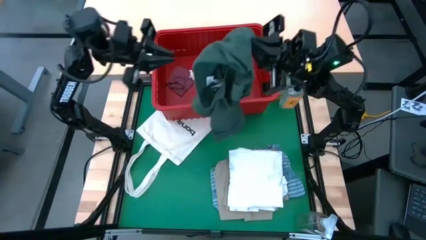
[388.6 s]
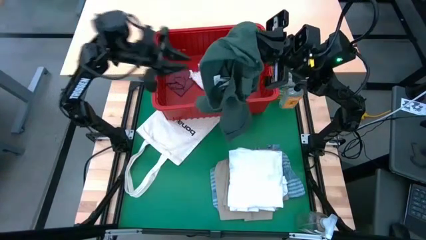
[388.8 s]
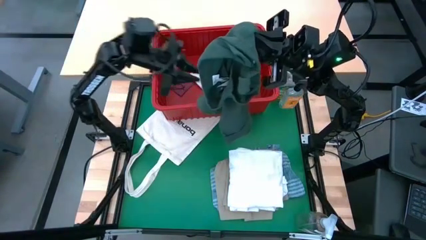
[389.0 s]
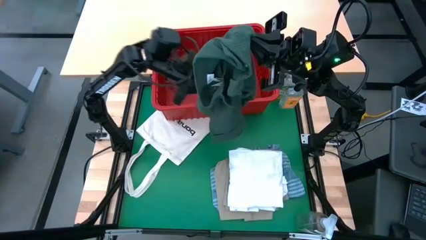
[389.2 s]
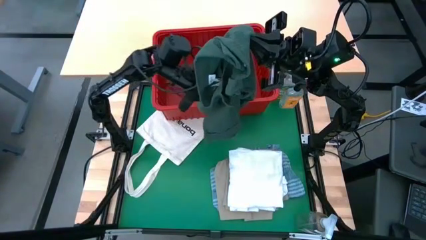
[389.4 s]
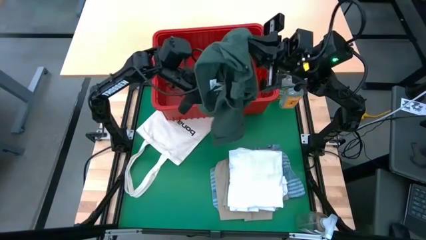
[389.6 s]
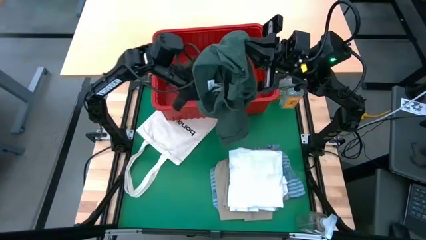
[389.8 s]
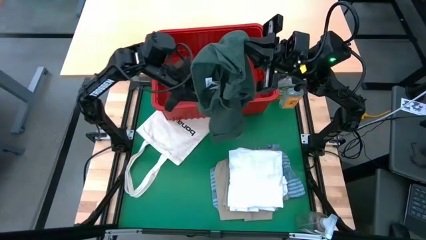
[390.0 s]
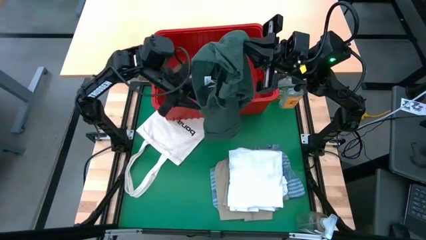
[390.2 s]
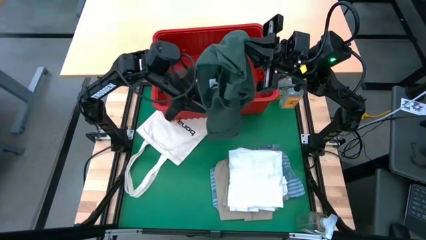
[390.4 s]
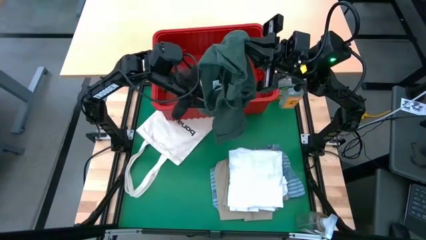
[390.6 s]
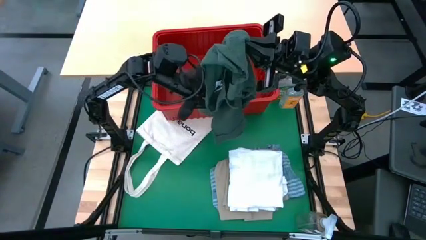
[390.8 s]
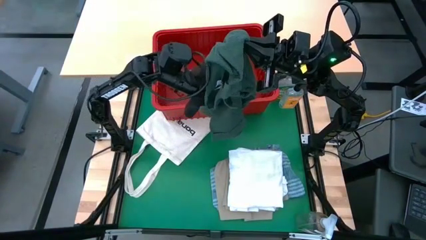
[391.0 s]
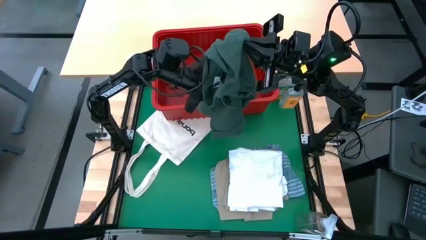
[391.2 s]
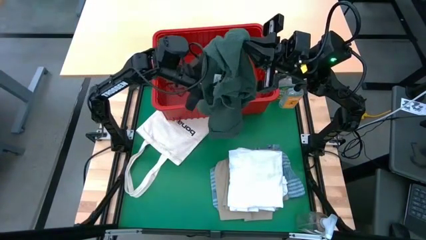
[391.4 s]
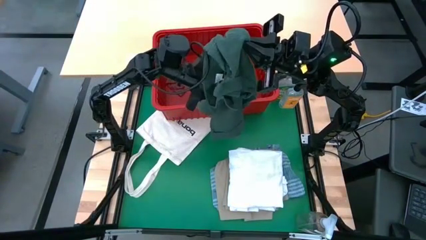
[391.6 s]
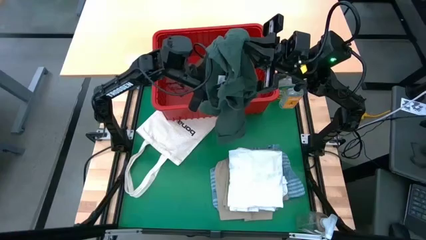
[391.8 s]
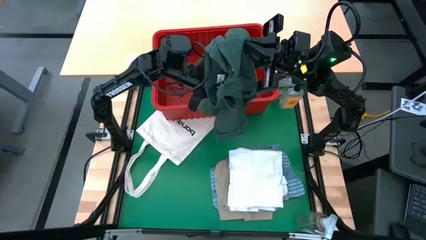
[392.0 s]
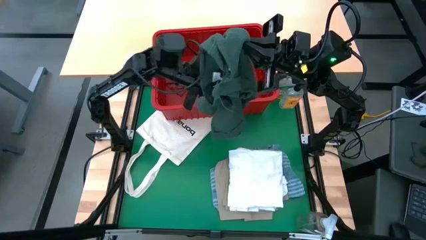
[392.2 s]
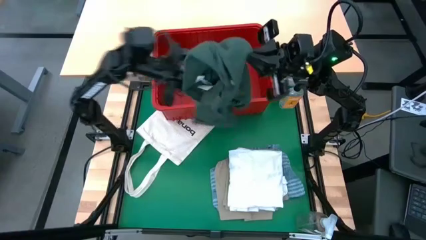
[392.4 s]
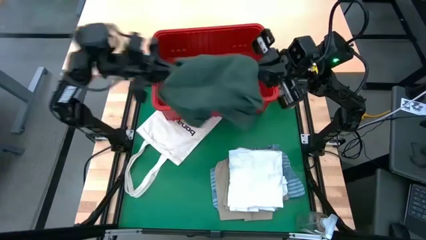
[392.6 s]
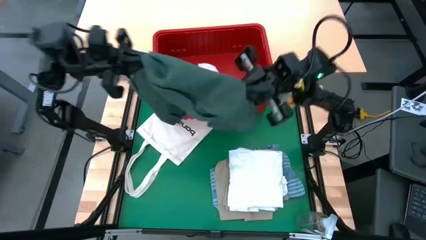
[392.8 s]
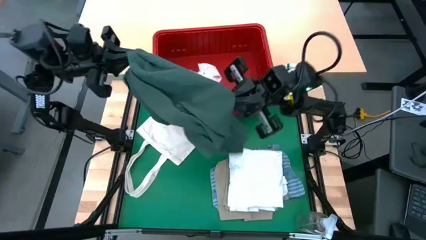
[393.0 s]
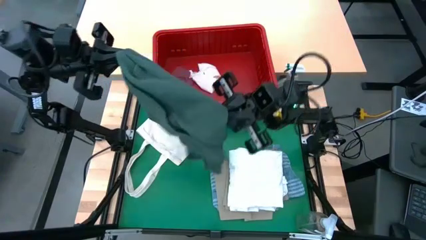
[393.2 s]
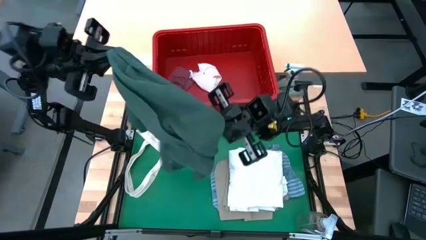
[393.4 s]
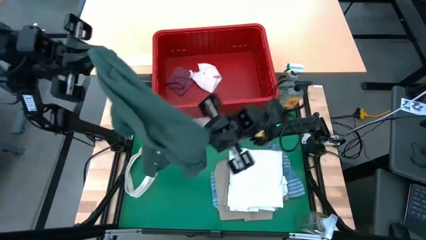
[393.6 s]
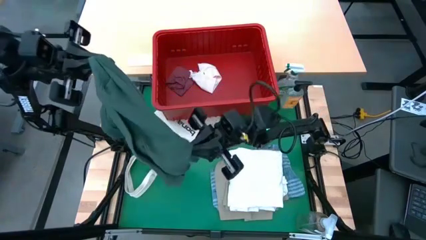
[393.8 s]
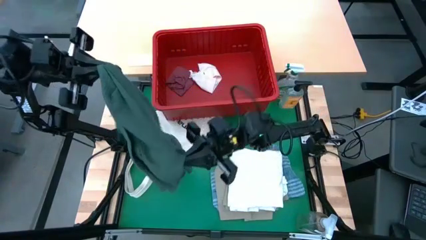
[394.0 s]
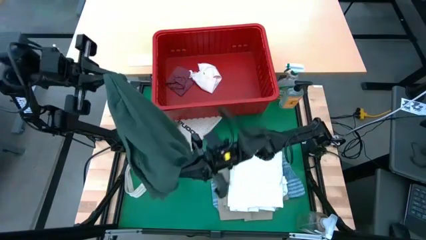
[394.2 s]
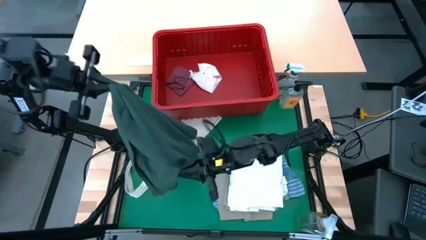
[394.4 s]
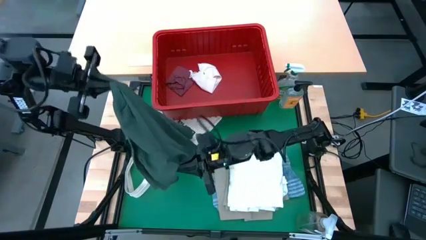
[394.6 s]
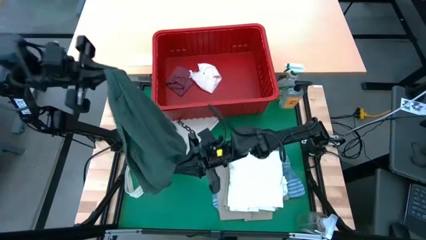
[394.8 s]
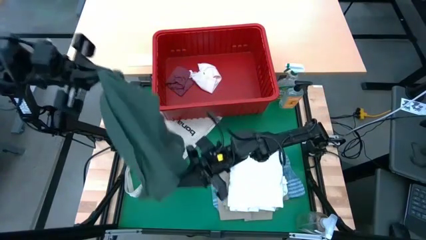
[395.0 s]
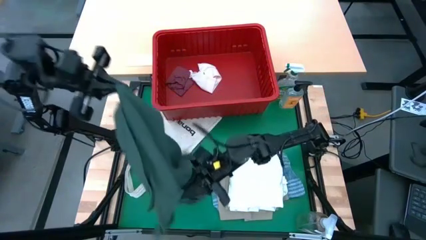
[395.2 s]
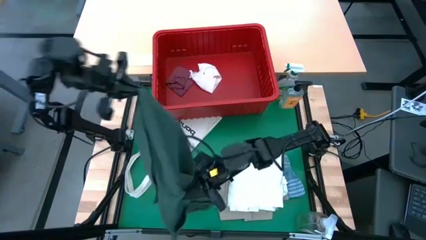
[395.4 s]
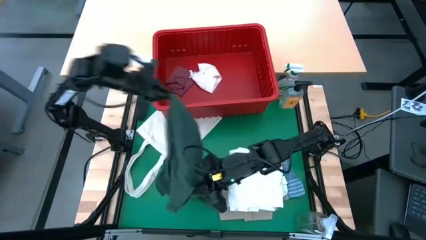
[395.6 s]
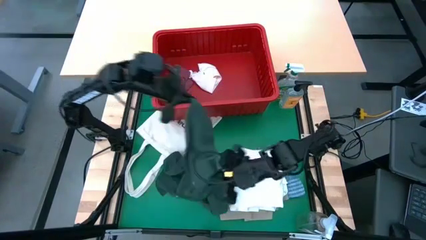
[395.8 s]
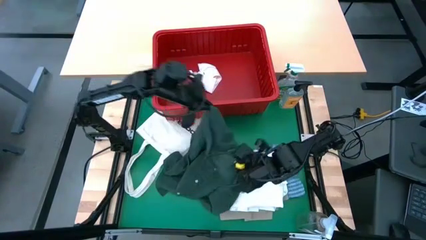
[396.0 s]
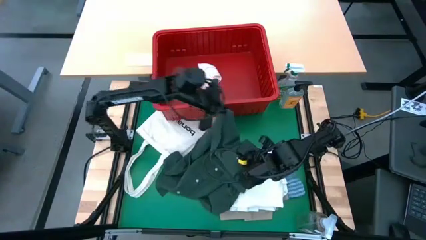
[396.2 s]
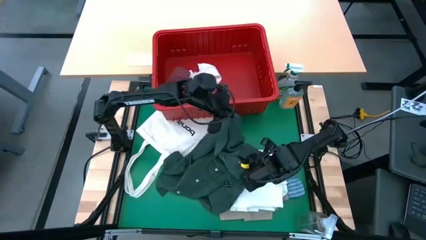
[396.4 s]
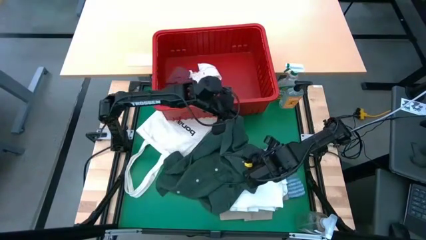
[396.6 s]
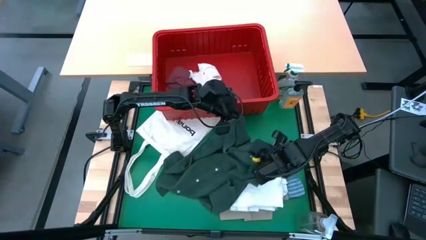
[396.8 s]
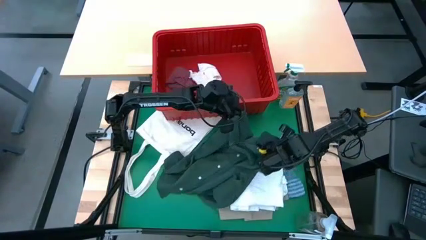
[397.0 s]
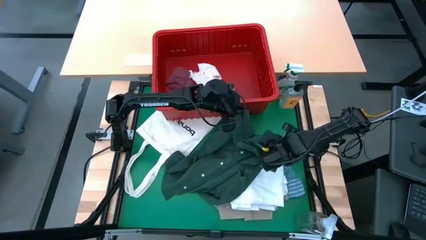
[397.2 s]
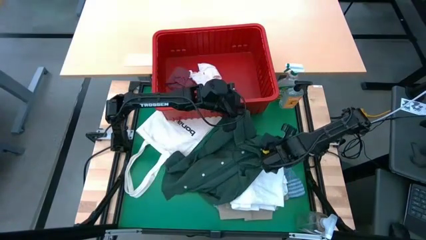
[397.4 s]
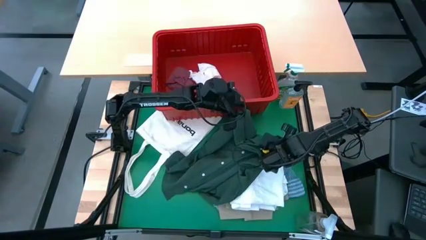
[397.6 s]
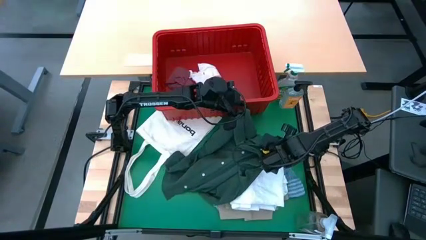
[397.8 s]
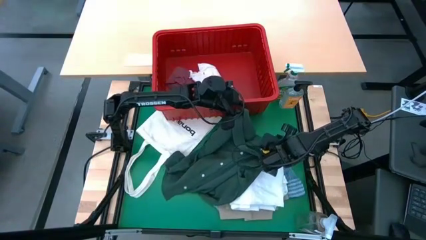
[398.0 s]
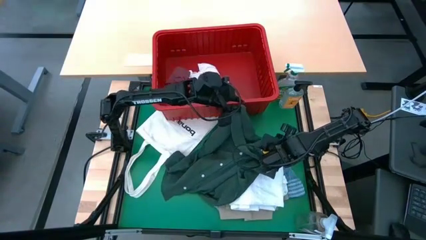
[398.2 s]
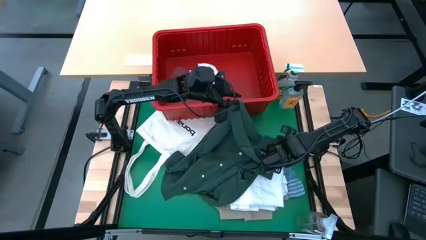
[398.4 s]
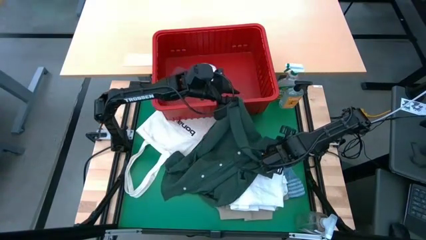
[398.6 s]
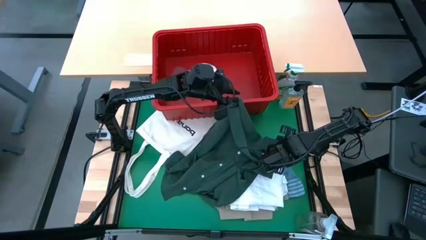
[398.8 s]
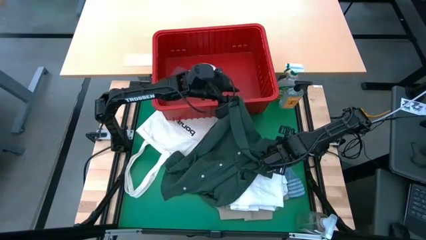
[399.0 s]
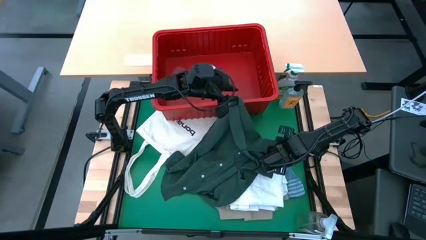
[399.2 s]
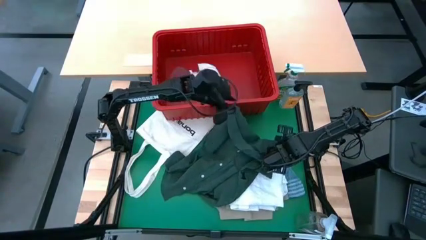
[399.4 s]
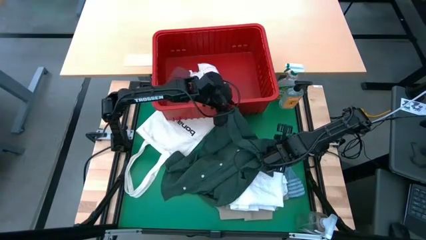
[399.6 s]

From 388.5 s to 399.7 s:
Task: Fold Laundry from Bin
Remove the green shirt from the red bin
